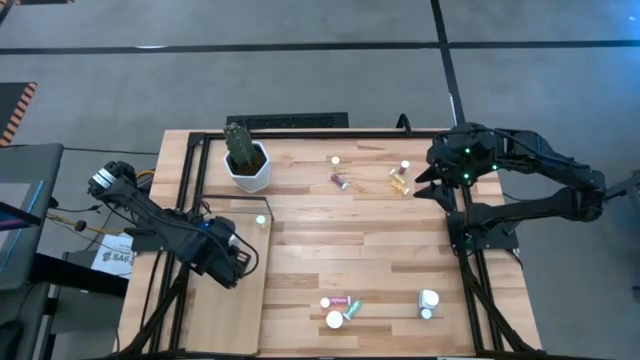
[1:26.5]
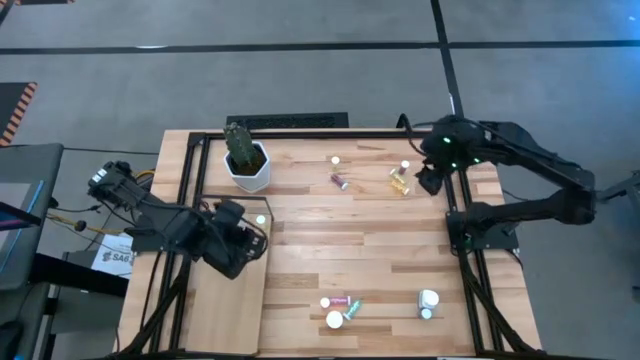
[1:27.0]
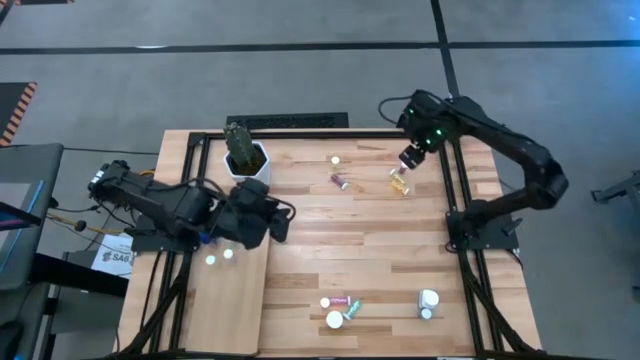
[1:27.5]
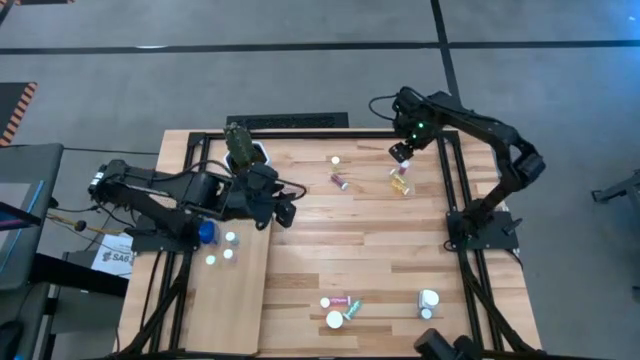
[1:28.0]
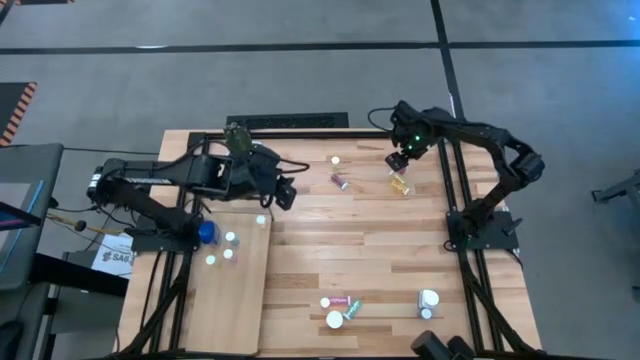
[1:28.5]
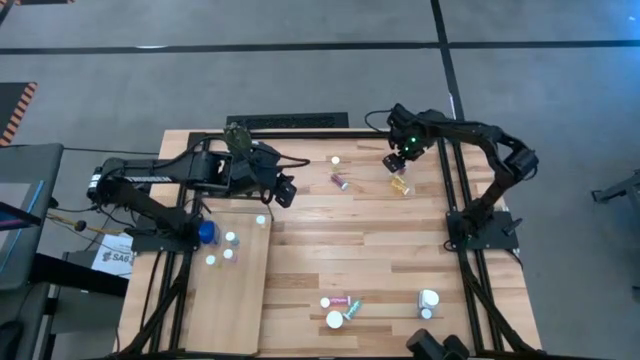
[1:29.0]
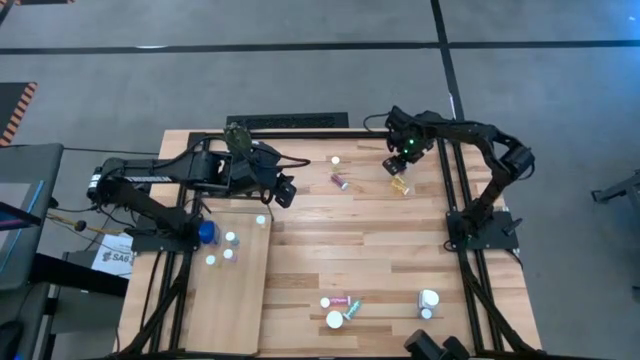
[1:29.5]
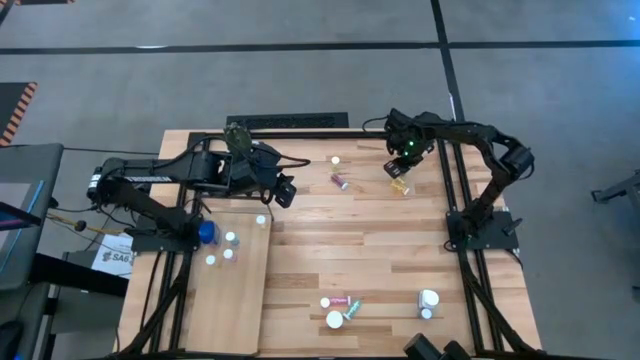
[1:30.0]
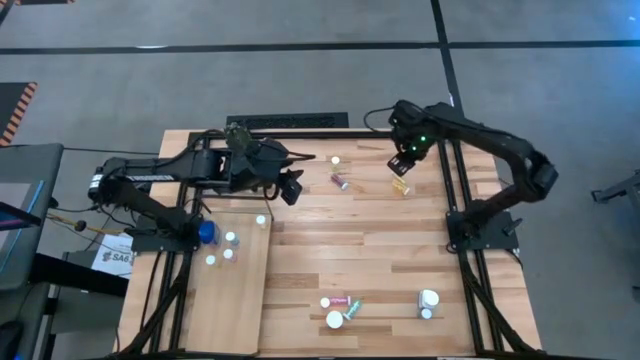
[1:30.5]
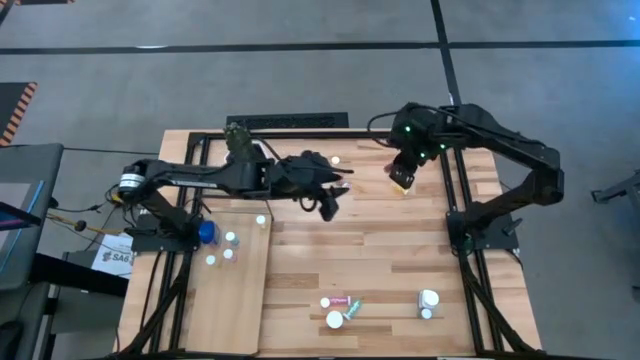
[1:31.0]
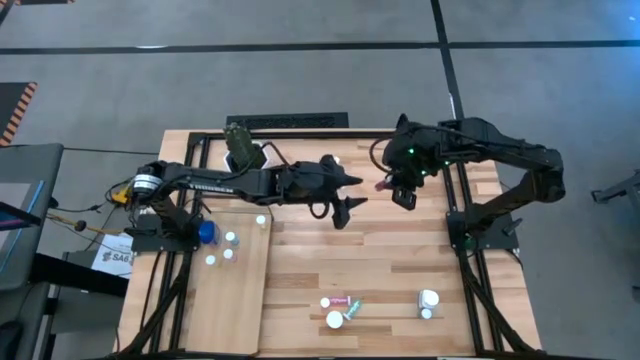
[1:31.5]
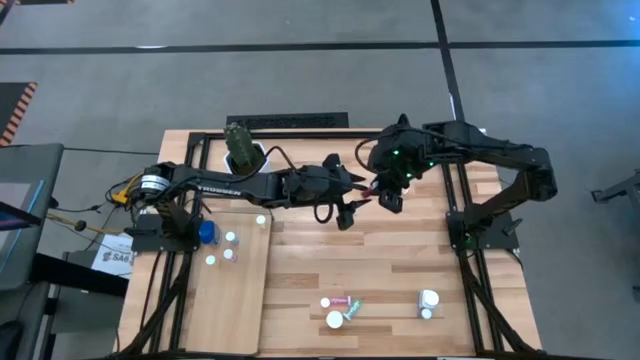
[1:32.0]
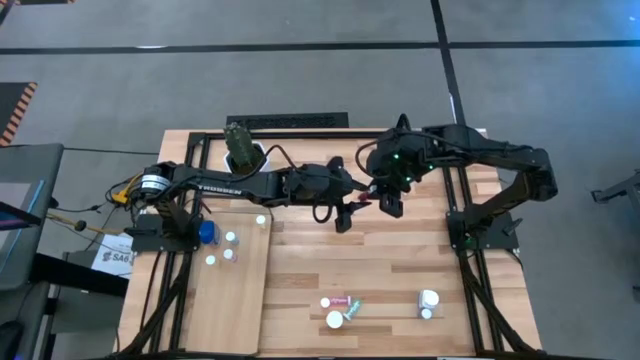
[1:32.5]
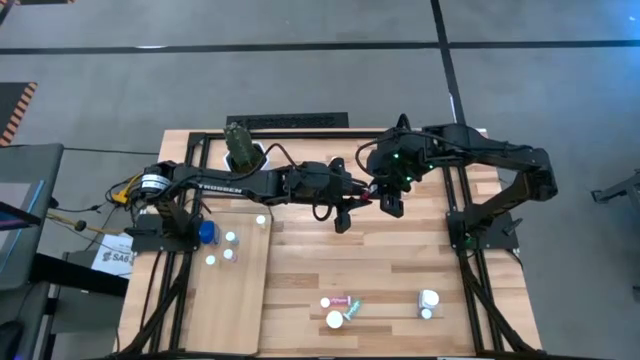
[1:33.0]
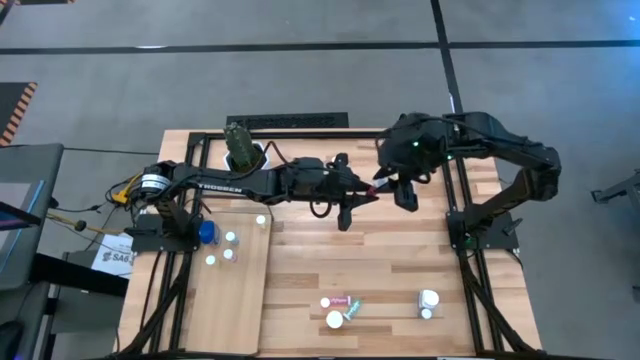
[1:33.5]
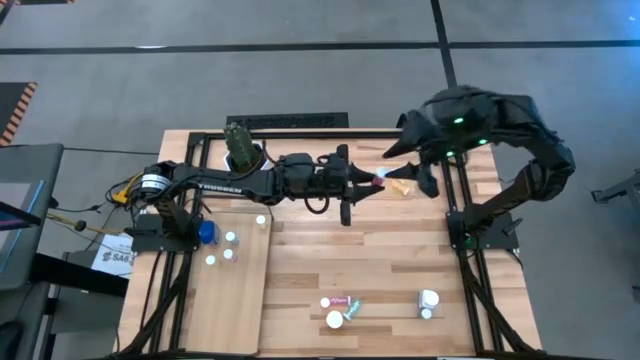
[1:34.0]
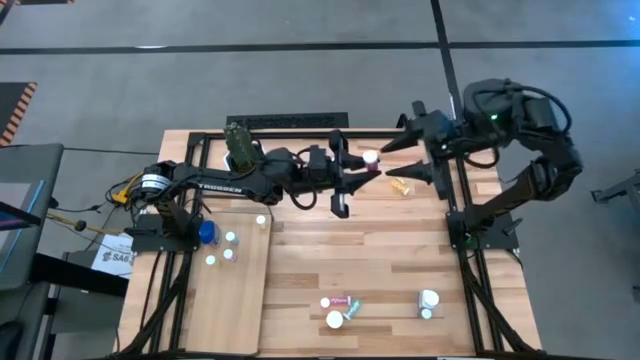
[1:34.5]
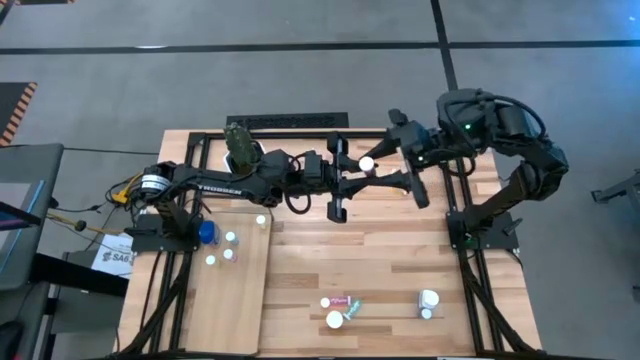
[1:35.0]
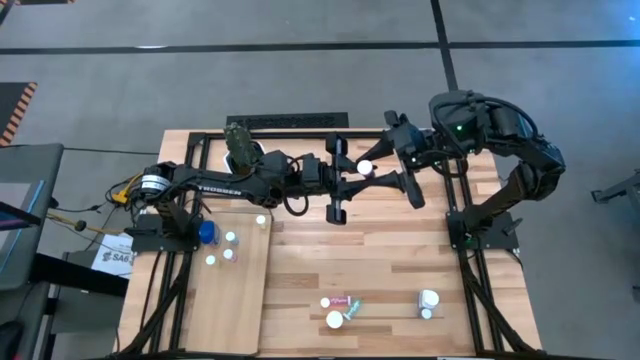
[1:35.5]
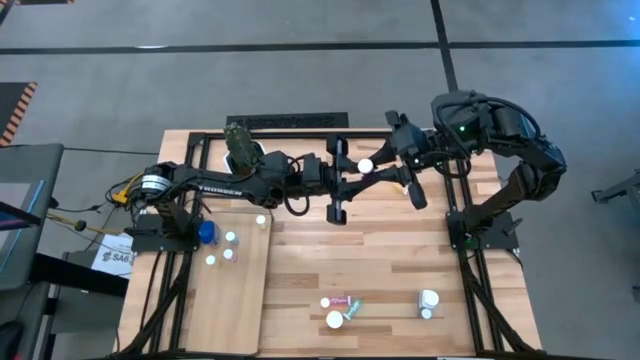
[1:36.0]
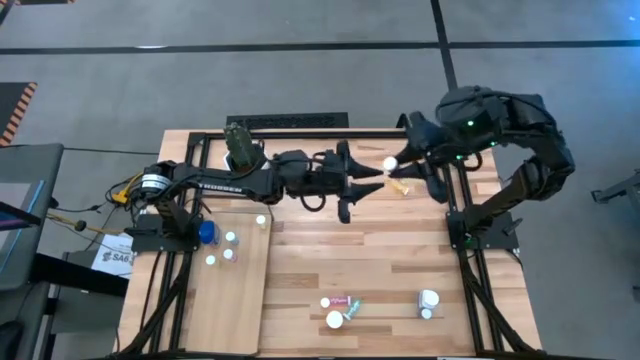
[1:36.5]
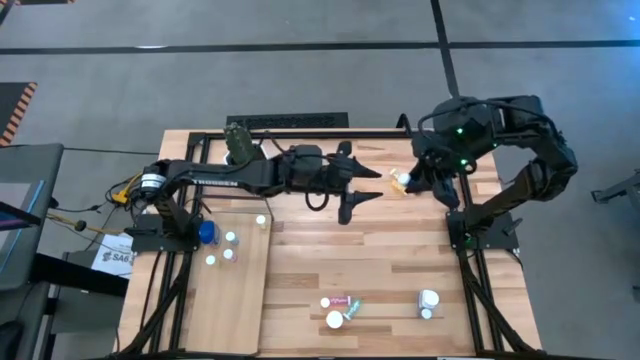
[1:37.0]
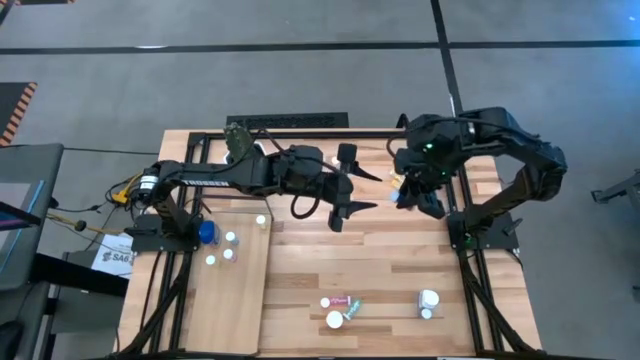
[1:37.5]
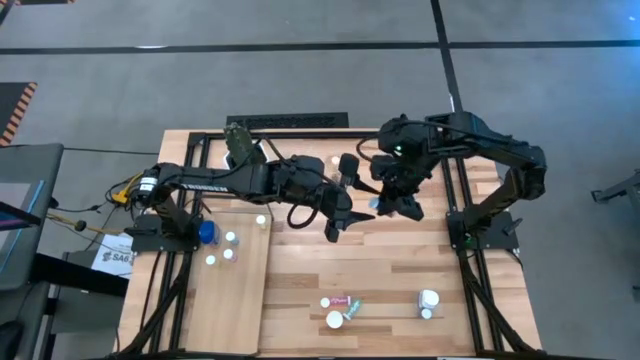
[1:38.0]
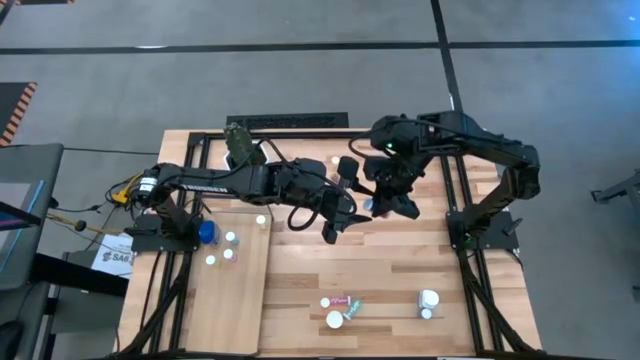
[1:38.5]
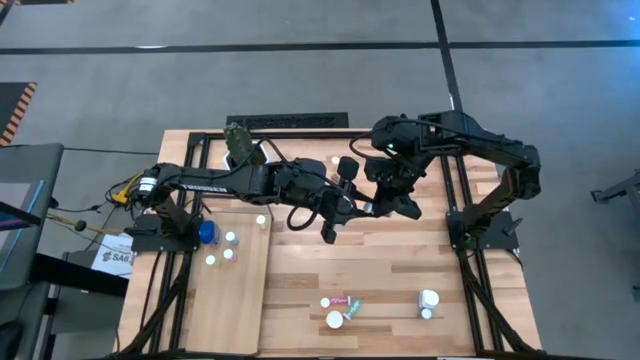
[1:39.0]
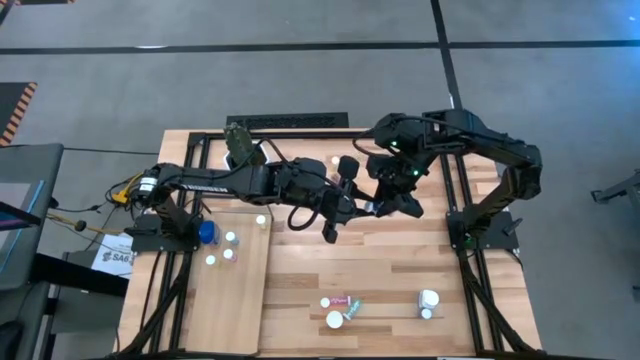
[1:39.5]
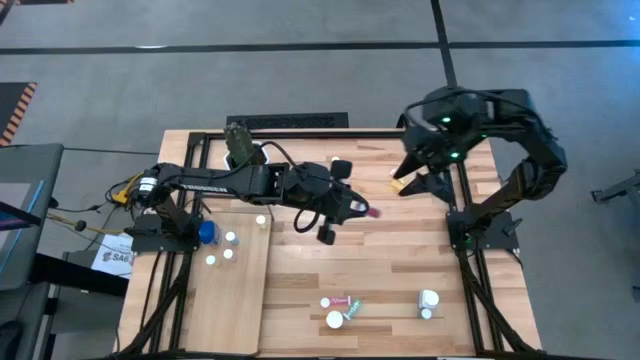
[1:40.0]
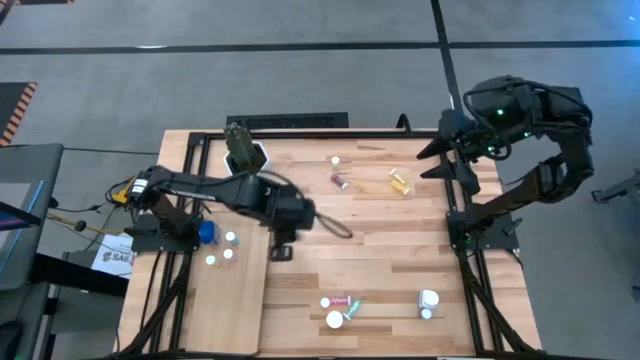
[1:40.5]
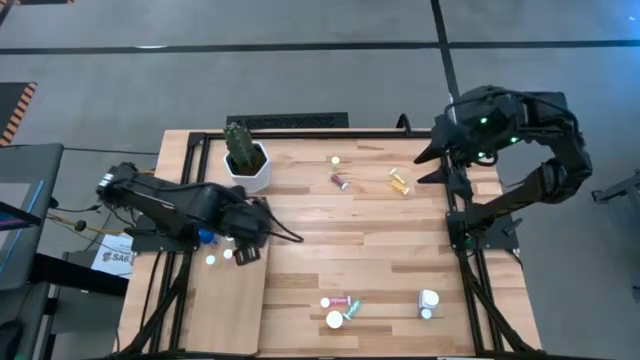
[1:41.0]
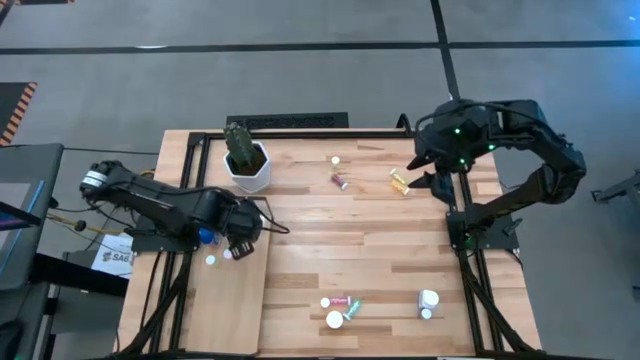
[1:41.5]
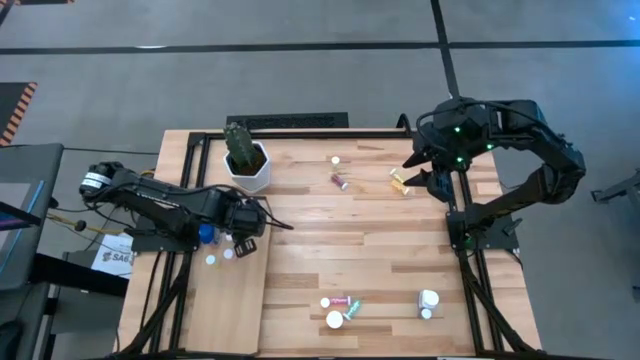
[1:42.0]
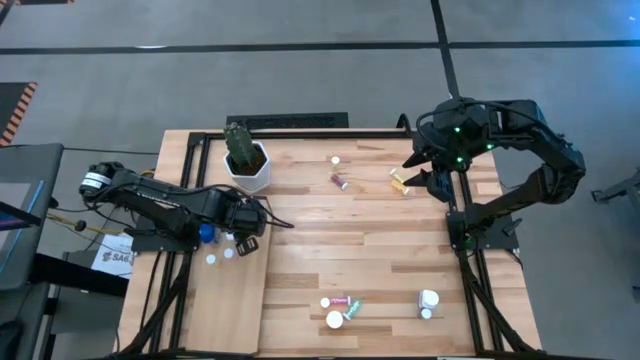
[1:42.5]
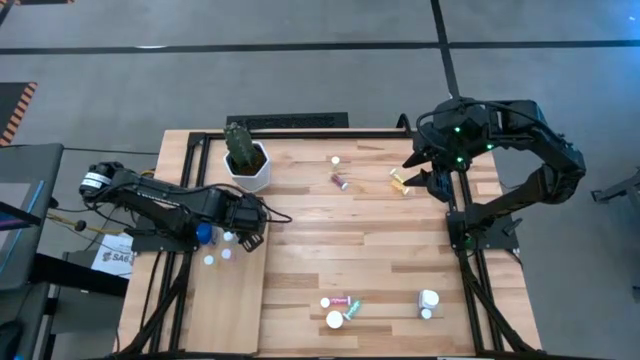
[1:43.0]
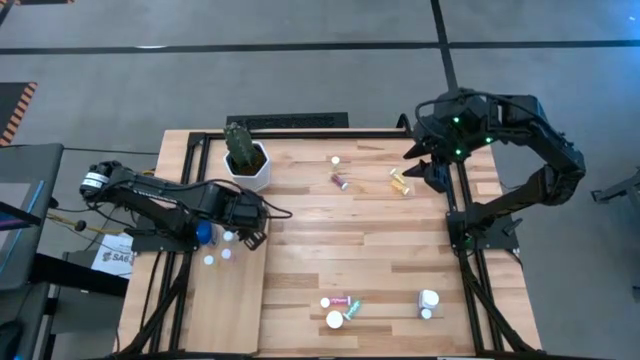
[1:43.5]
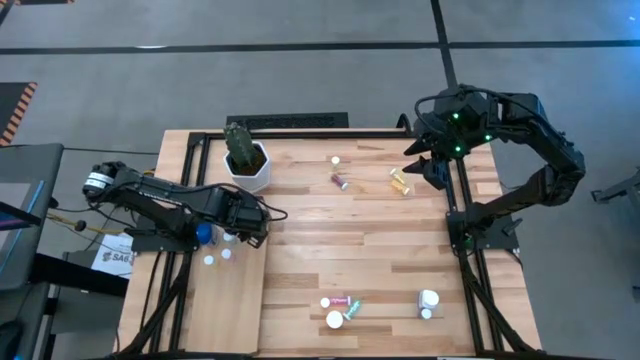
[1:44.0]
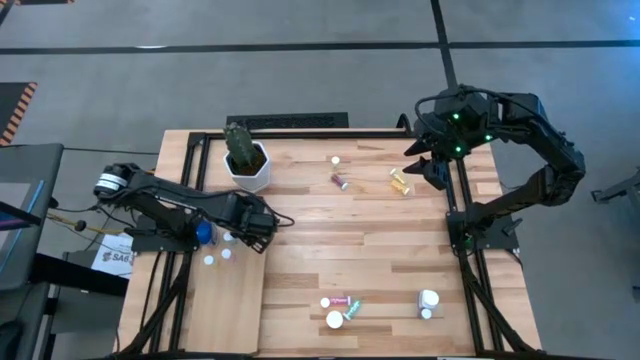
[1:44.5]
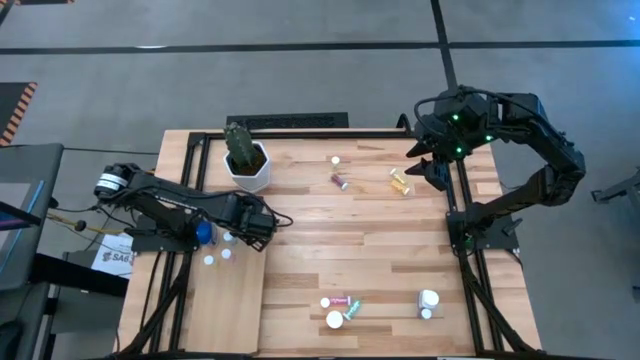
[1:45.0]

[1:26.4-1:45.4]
Task: Pick and place medicine bottles onto shelf by color
Put the light blue pill bottle on the shelf
